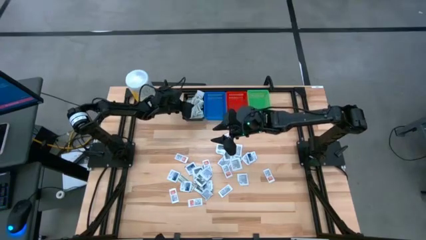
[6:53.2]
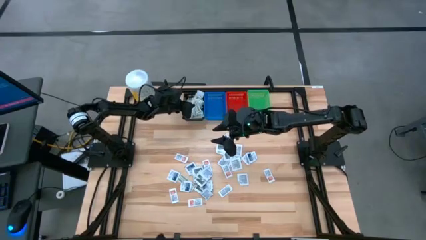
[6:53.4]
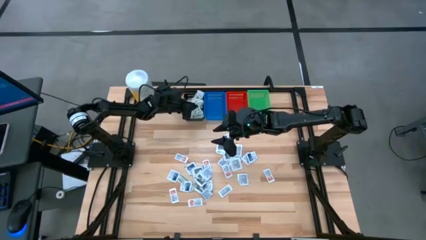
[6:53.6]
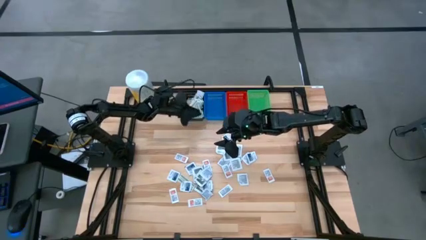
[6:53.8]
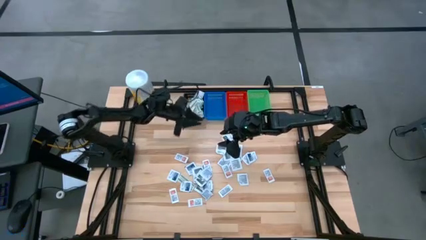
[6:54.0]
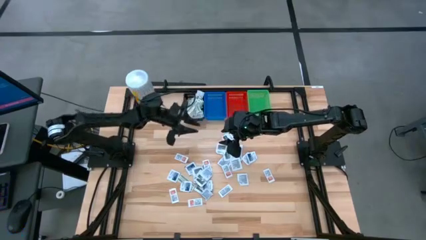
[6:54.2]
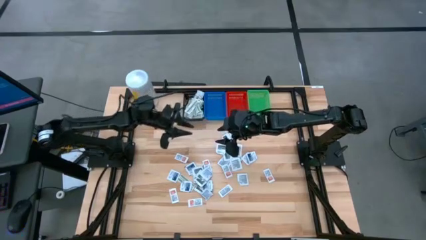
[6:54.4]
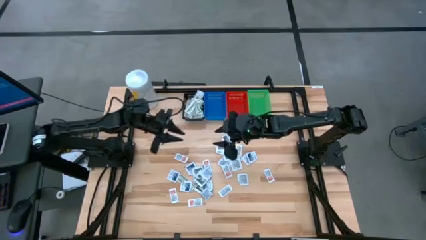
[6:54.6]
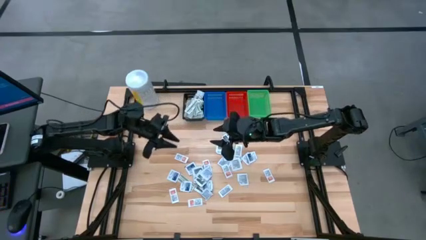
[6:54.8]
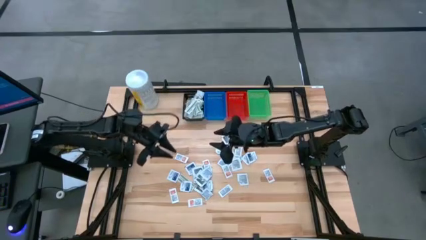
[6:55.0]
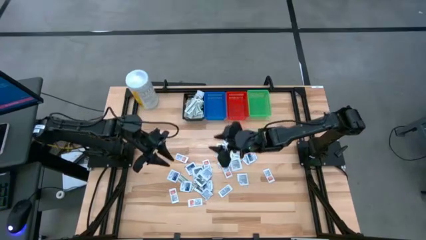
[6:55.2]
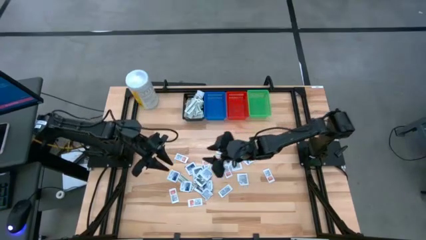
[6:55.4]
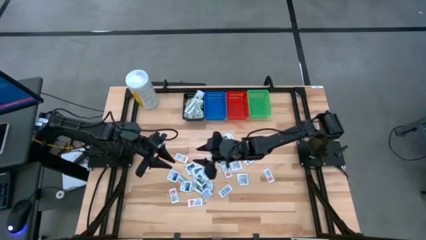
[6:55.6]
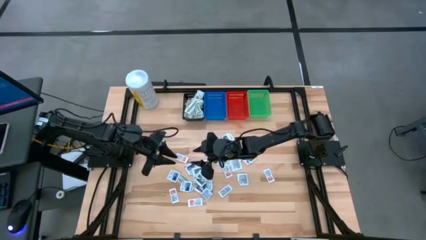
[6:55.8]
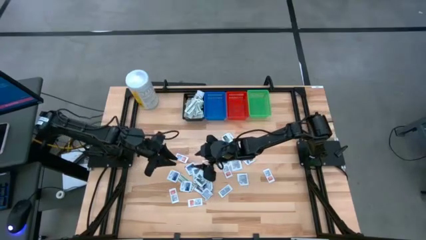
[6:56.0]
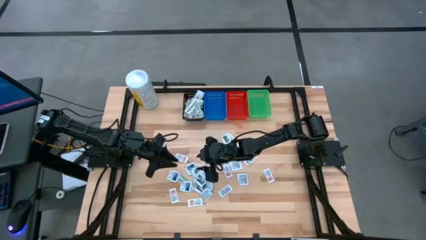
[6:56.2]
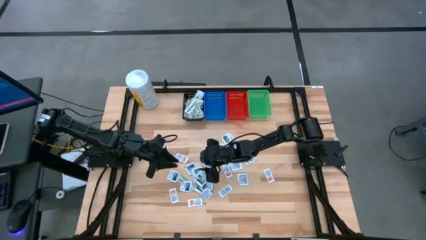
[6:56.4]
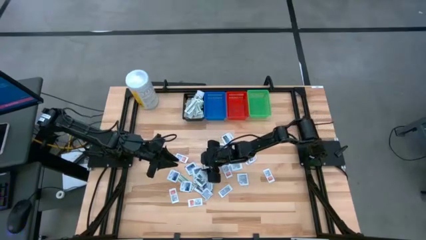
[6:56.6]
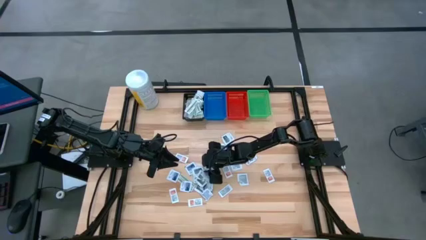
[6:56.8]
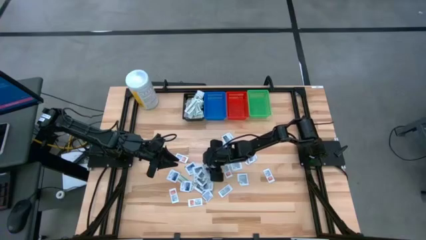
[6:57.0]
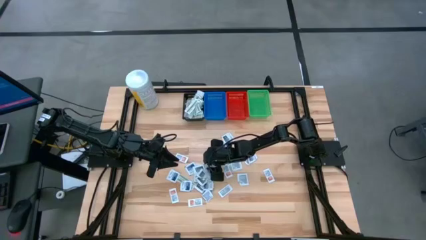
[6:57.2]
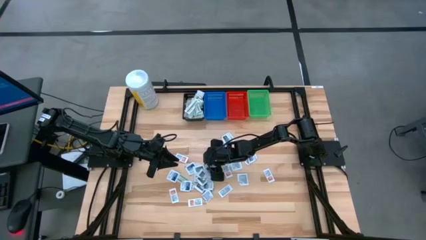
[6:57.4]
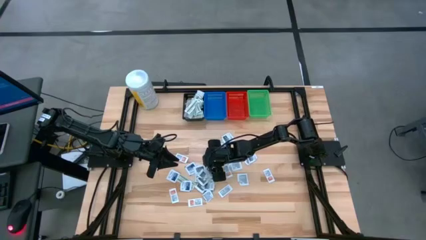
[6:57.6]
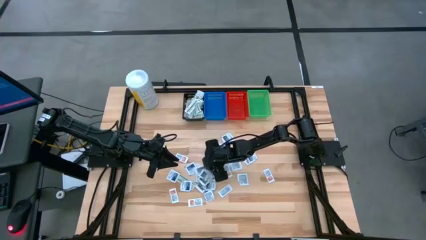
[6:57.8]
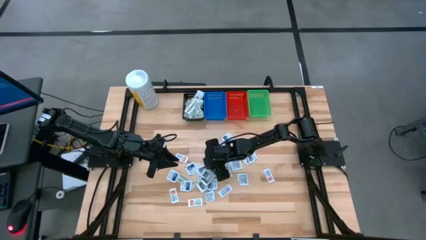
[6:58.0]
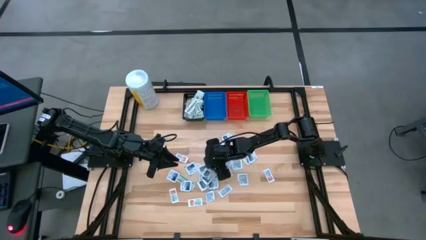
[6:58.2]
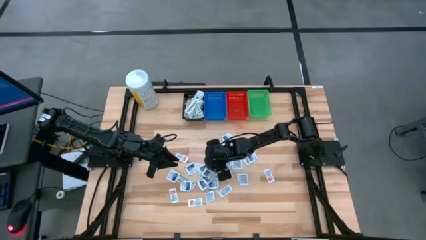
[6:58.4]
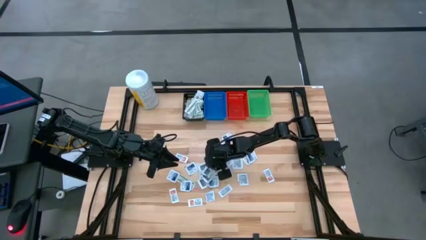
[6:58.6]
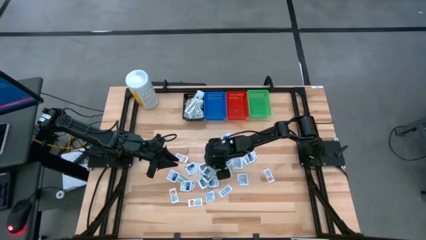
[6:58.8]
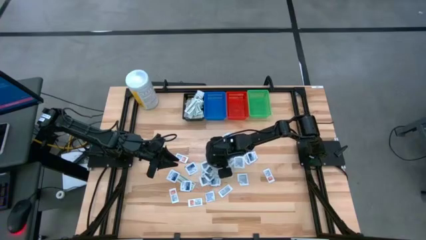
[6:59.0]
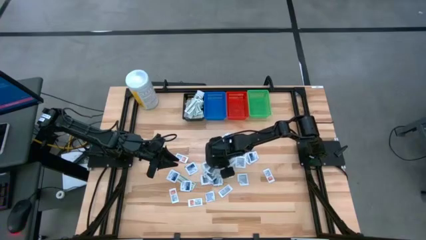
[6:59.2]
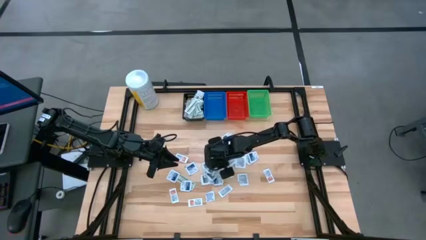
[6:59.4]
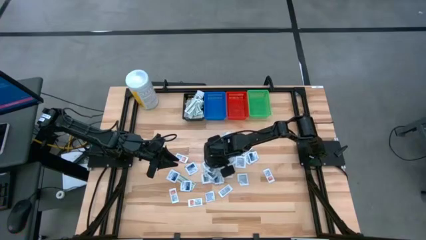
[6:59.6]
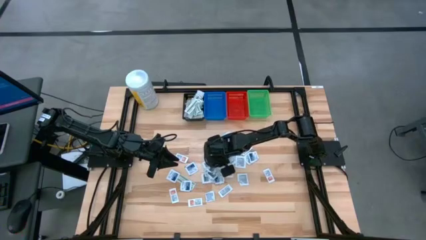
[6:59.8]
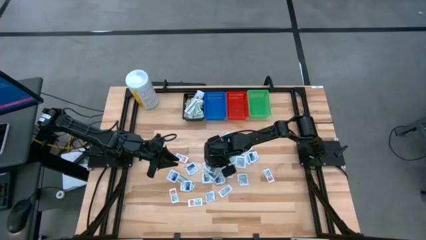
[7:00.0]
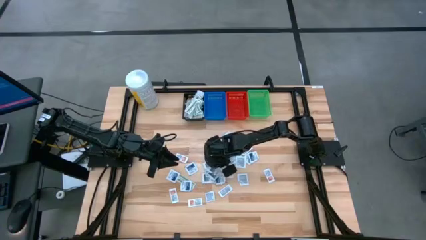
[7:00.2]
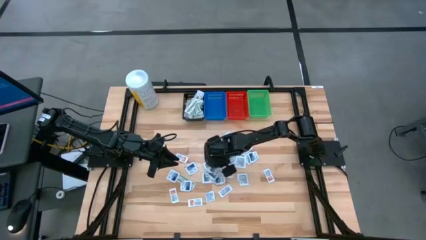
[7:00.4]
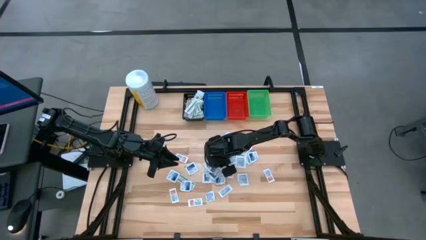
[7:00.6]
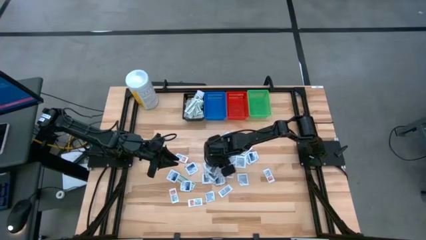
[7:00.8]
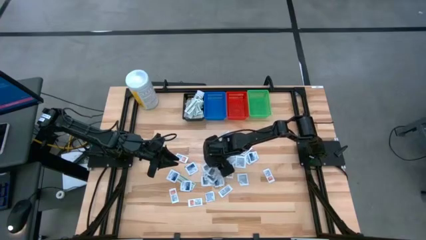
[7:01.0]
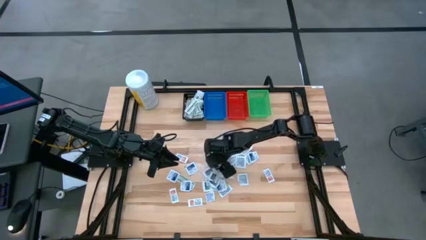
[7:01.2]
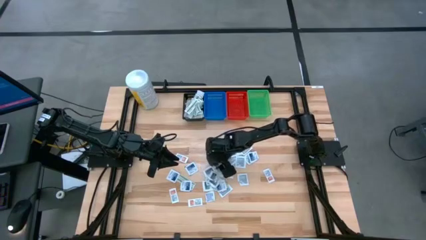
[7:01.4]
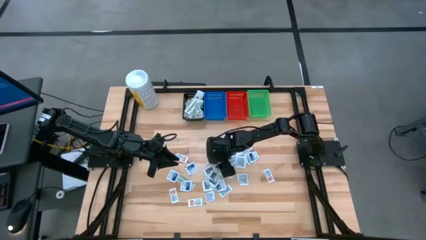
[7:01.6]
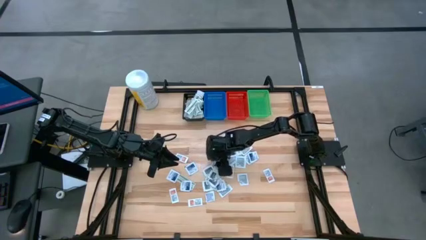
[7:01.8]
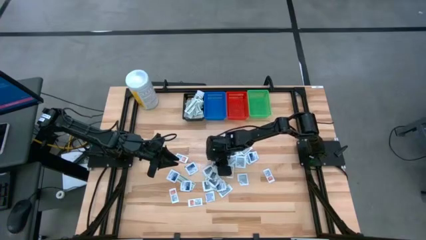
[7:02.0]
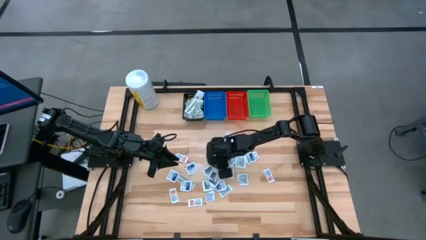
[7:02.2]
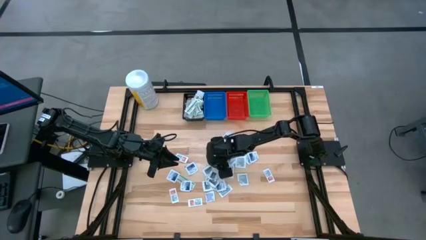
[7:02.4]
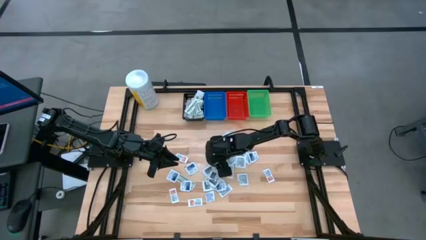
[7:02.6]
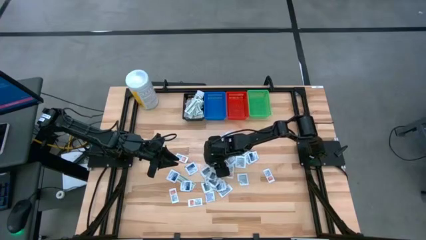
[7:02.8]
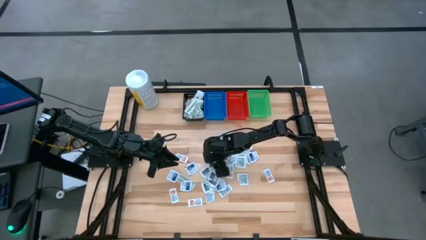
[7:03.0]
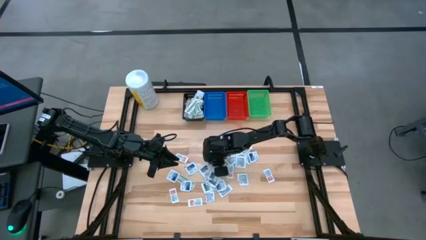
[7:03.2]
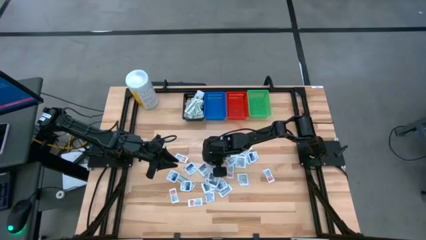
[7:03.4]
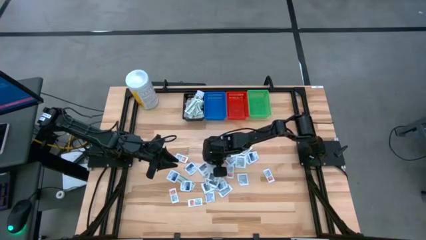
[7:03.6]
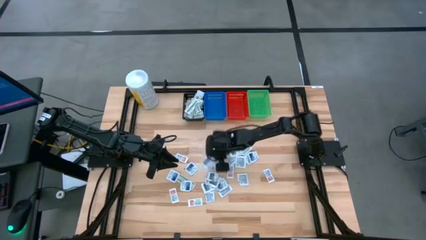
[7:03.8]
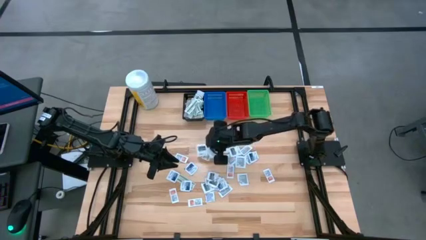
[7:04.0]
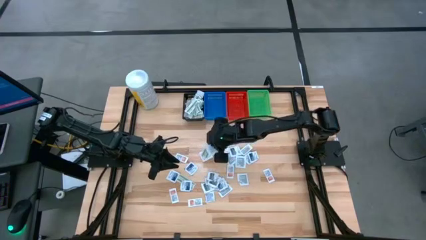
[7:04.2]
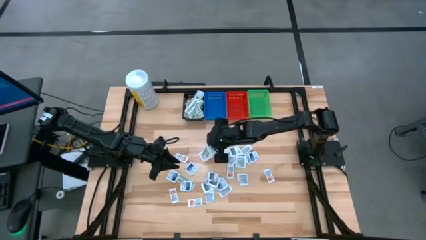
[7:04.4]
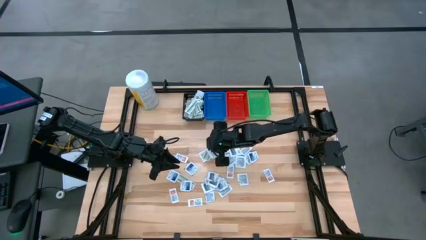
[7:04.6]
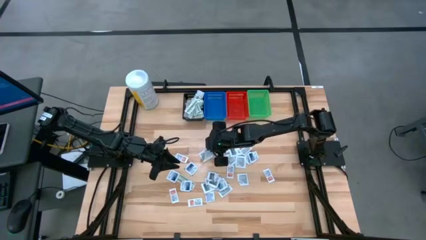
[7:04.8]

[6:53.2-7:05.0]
Task: Pick & Place First Aid Supplies
Put the green bandage pack in the black bin
